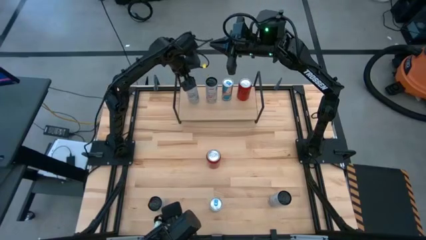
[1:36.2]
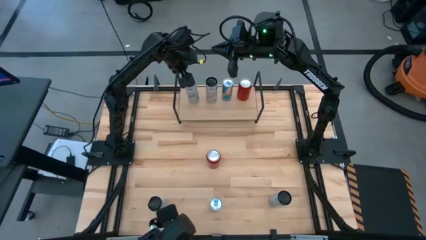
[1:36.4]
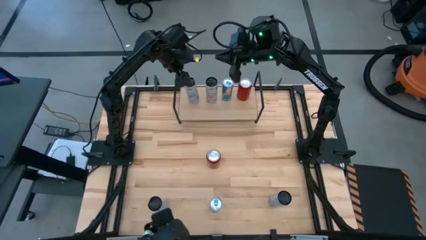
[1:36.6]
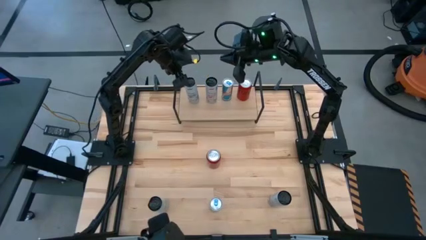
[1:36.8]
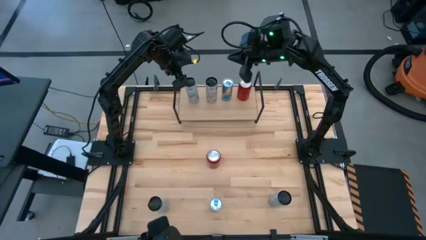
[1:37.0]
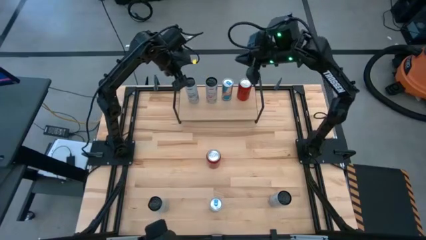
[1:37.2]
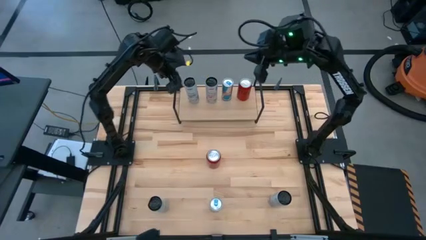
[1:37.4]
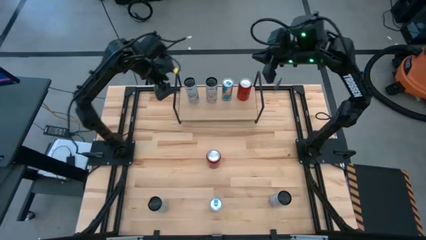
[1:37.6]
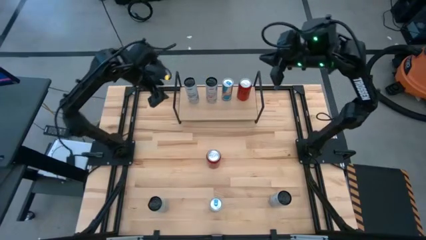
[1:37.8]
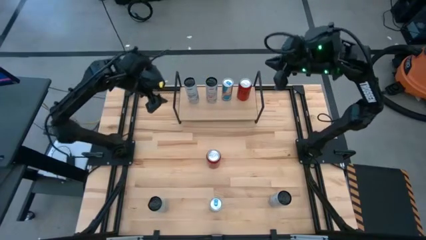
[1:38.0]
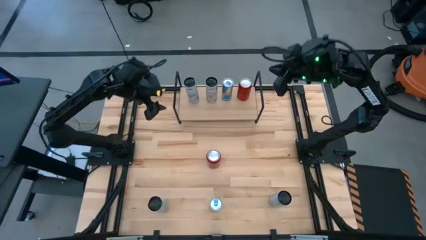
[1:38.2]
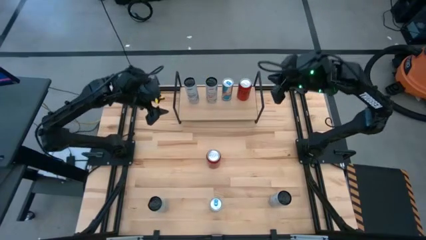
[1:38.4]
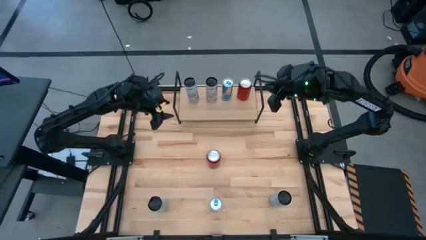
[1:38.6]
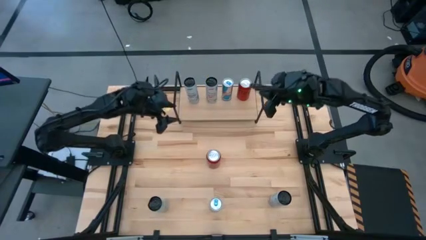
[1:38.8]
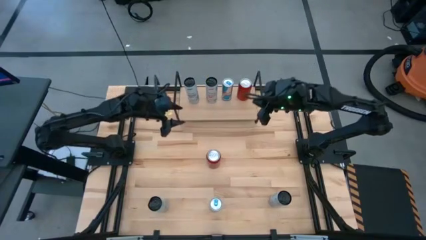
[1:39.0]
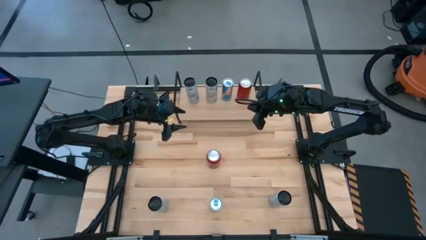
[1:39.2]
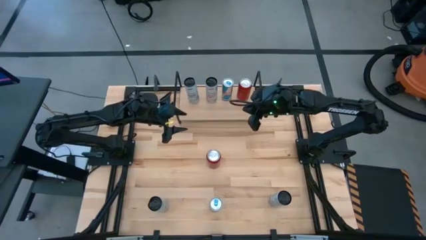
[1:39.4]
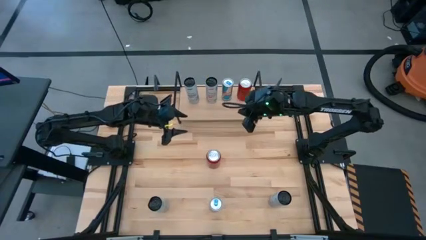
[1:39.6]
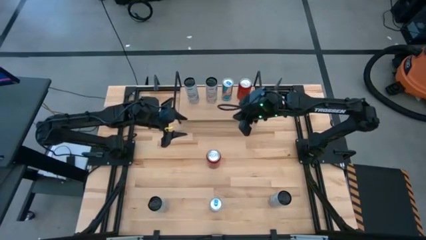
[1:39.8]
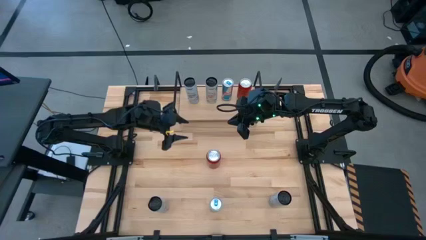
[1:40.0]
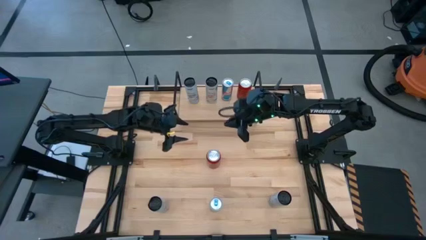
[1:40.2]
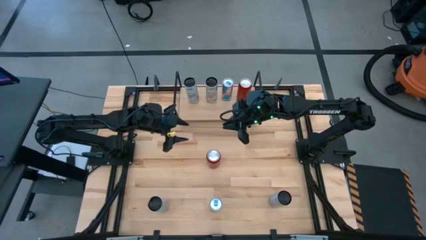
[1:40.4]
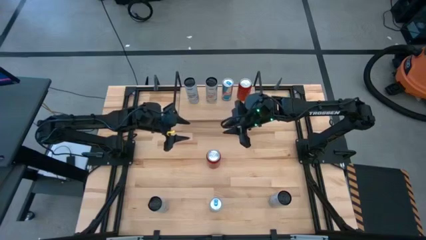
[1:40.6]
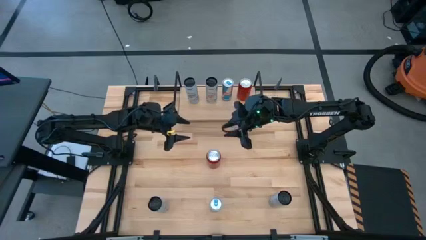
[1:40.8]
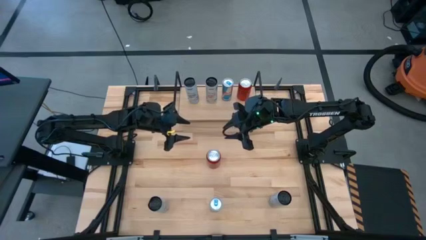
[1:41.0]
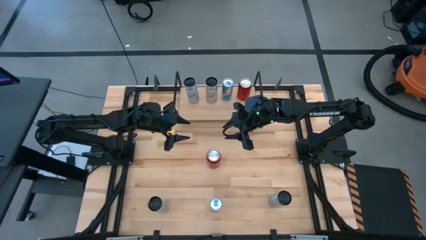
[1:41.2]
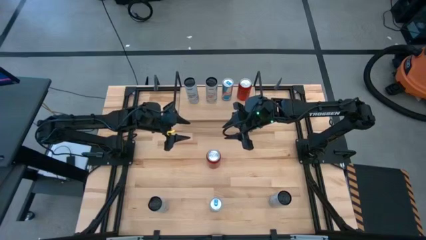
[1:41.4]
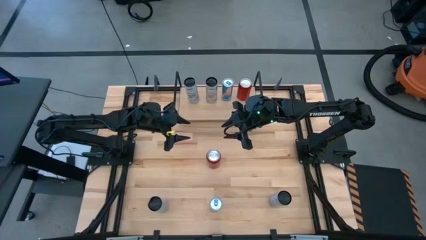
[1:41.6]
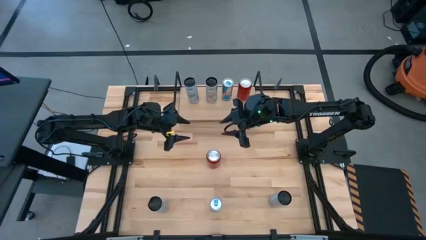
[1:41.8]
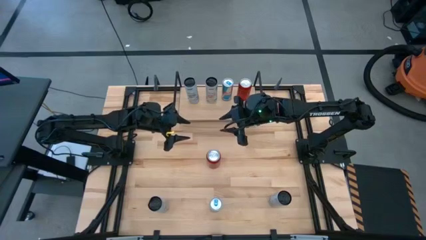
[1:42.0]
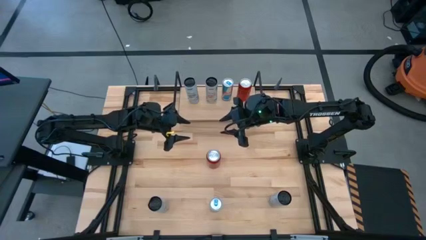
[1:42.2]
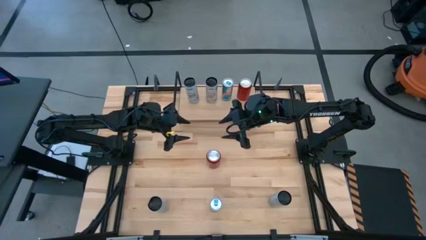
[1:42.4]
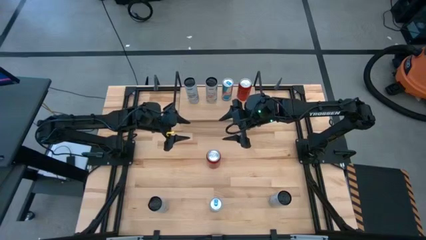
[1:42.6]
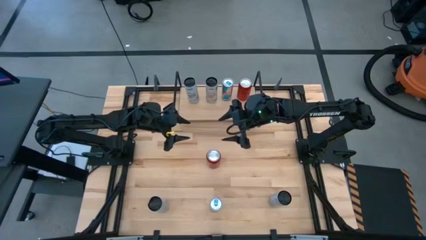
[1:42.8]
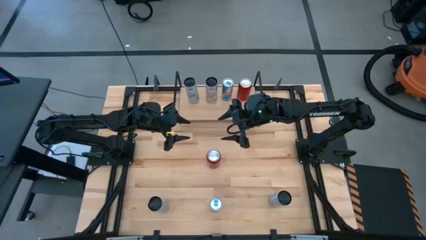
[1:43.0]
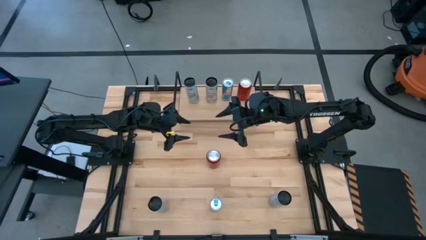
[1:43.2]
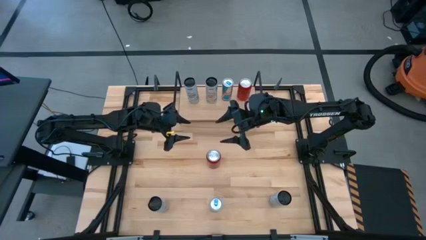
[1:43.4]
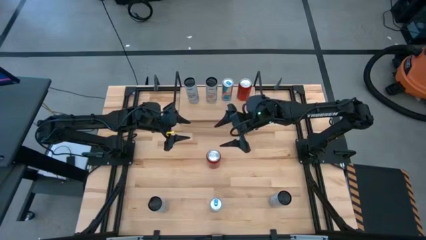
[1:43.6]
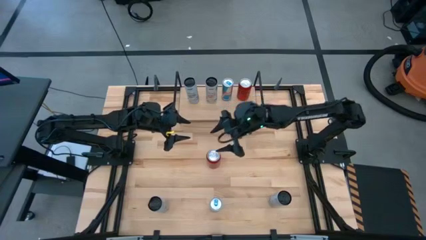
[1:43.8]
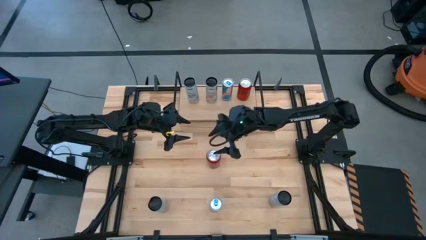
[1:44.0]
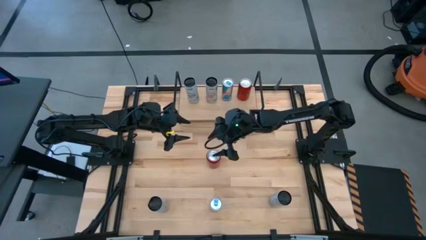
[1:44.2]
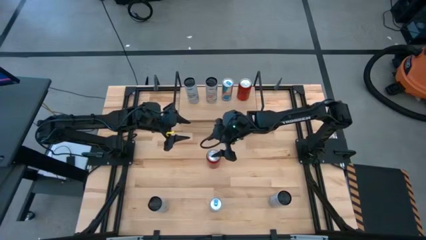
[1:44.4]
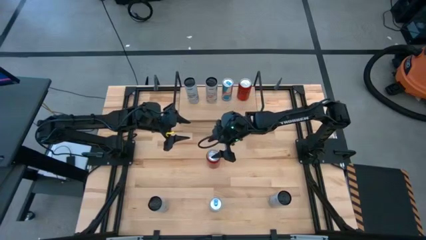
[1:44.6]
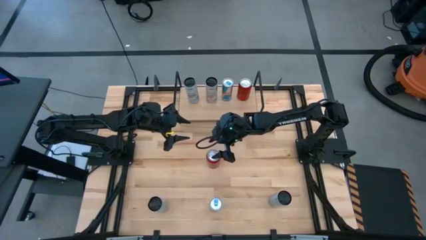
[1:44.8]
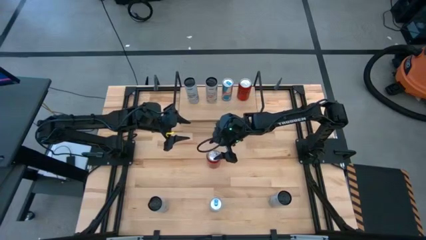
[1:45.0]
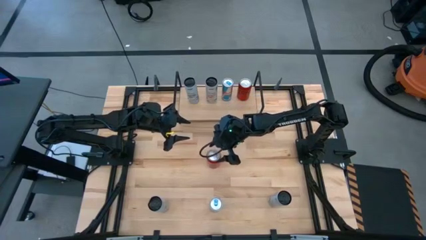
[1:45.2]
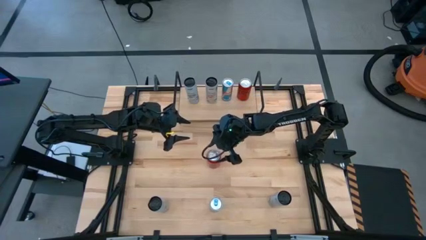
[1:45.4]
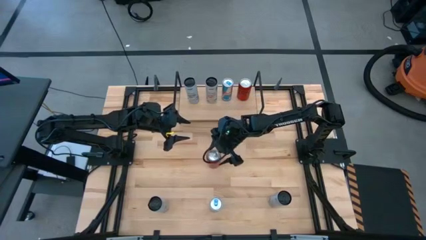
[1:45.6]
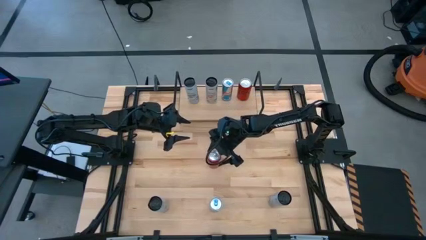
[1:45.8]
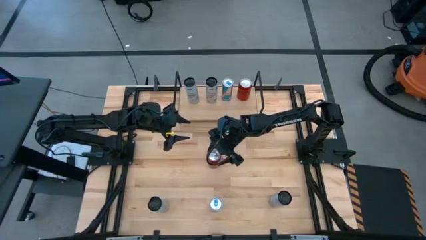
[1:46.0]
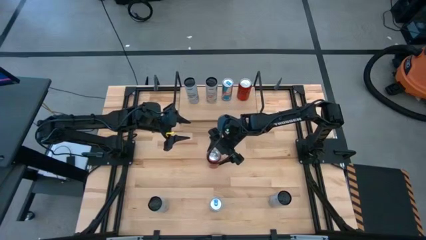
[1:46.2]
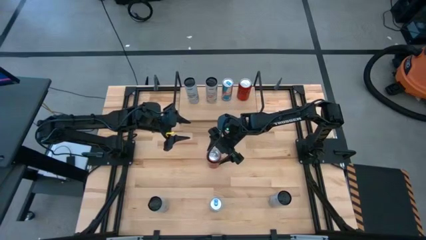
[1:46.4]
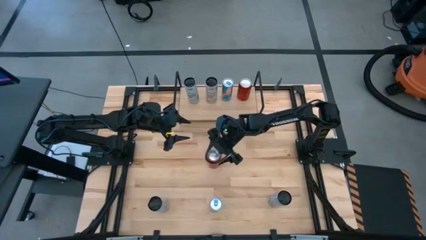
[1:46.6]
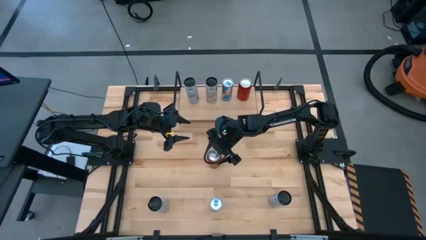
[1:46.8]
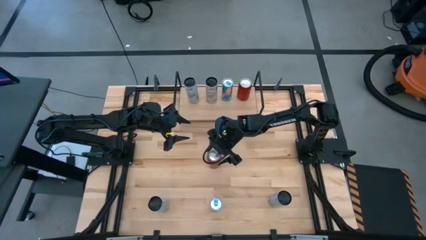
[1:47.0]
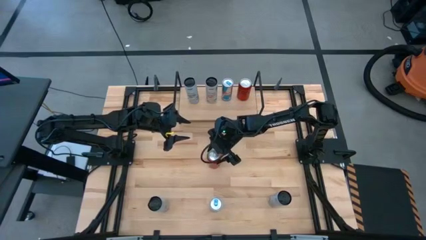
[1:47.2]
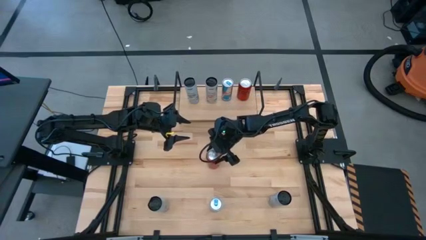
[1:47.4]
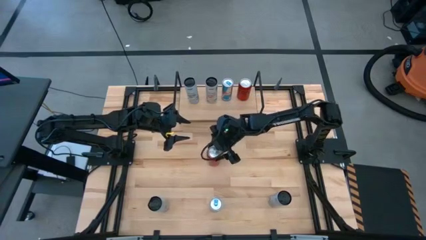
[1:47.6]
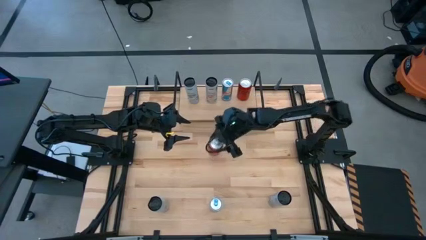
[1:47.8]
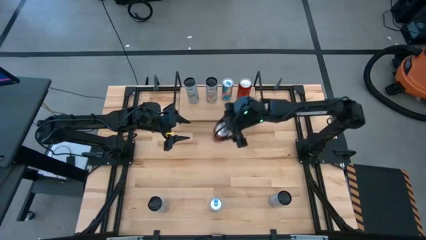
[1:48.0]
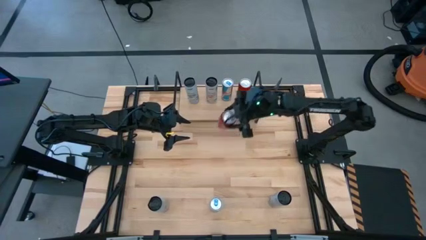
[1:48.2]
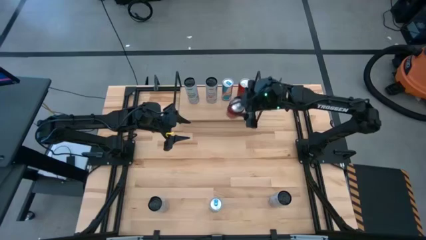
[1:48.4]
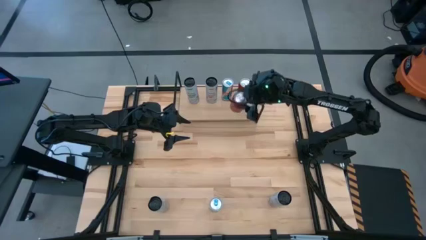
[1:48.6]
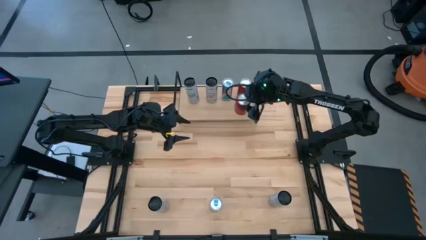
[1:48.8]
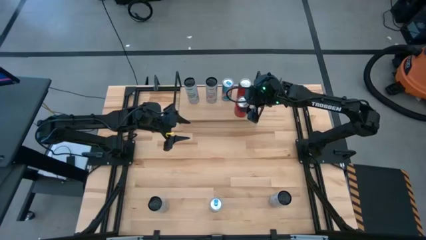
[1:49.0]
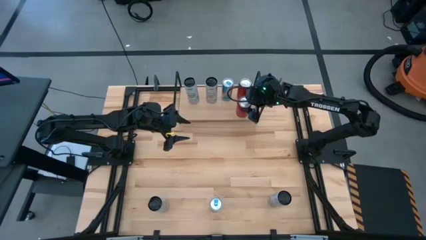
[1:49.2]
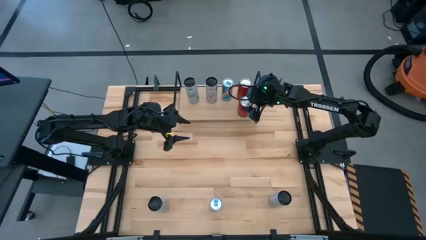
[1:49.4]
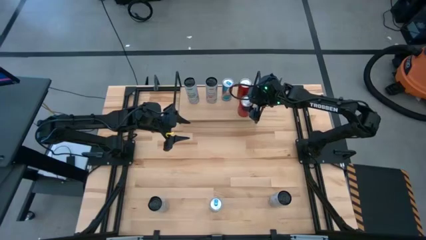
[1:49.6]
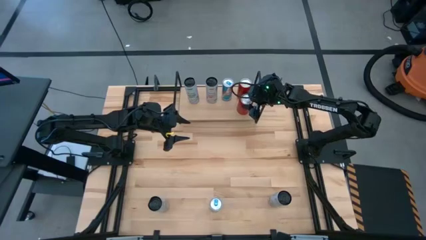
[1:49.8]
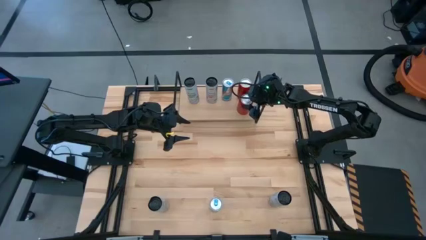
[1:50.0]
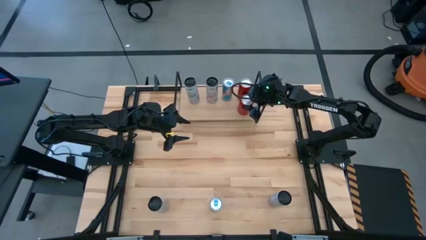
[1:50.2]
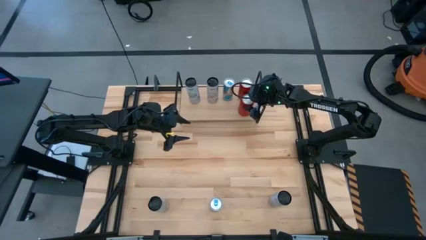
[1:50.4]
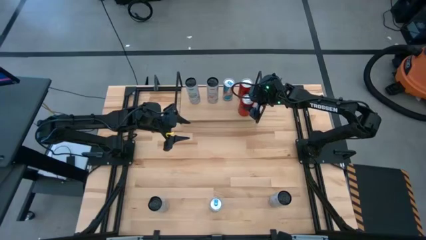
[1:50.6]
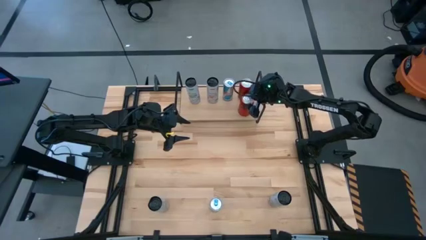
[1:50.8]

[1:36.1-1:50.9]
Task: Place canned beverage on shelf
Put the red soda can on the shelf aligned with the other red soda can

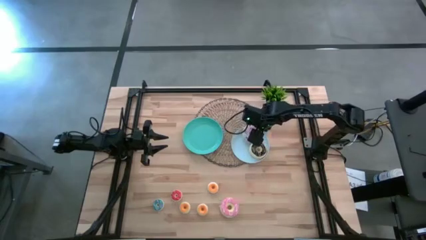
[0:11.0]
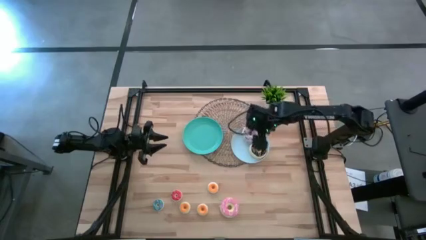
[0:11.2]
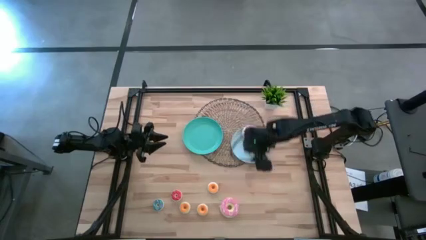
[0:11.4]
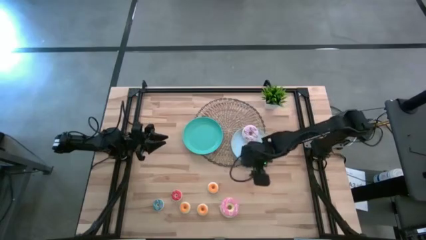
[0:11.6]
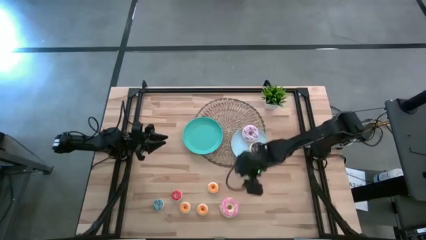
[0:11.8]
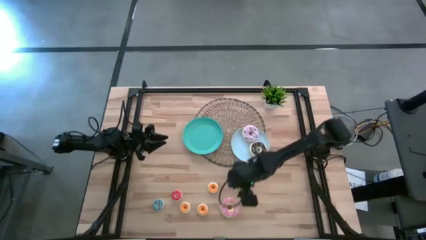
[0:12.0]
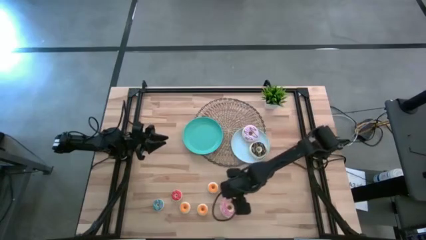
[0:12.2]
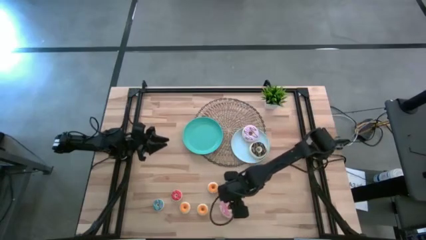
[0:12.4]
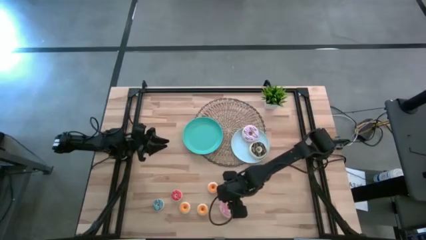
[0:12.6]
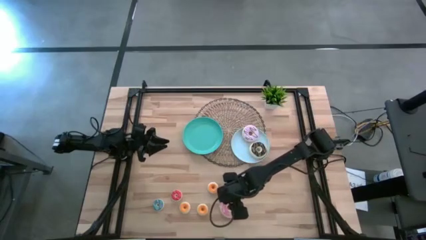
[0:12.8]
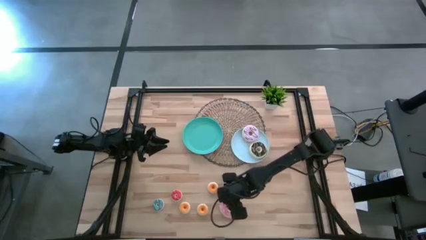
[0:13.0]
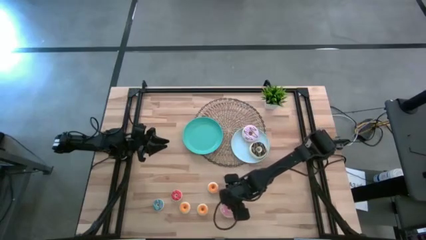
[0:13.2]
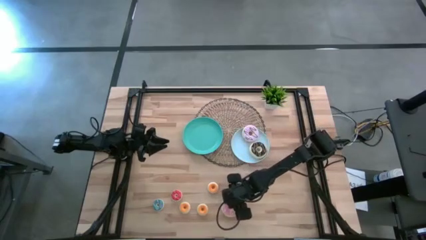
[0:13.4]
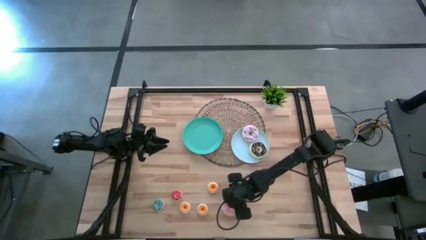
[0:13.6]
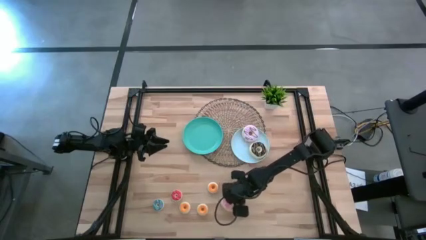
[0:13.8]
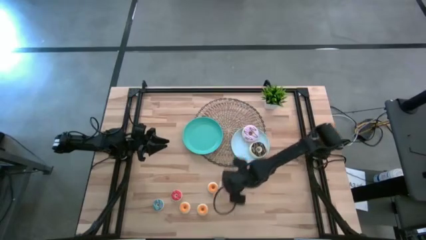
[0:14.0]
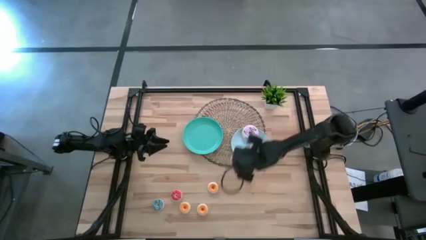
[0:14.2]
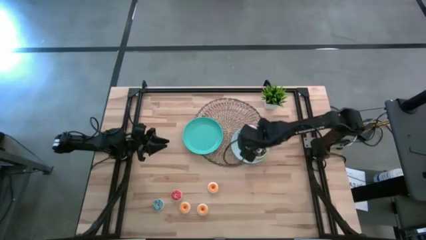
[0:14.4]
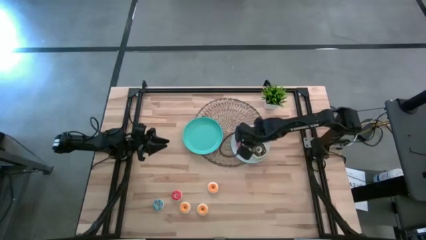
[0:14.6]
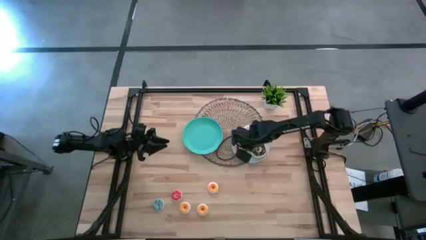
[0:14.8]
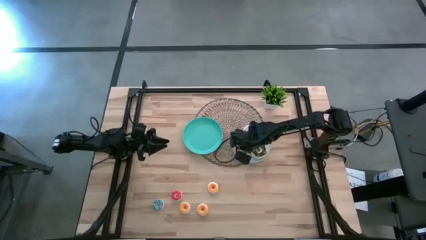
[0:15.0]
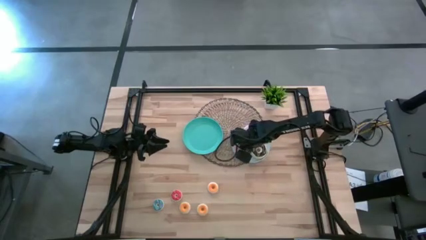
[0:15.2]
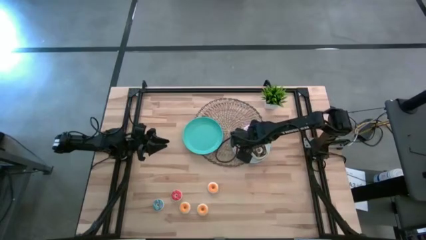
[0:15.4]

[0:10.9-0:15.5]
Task: Pick & Place donuts
Put the large pink donut on the blue plate
